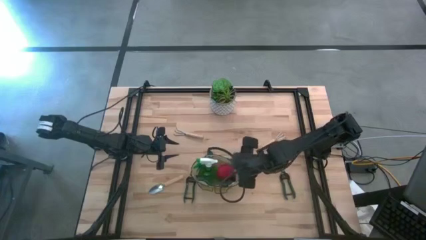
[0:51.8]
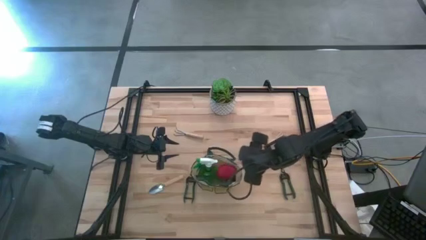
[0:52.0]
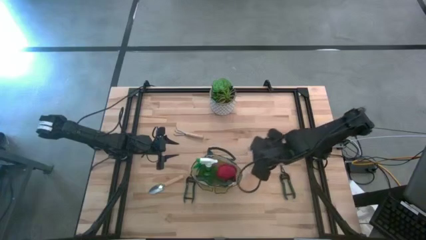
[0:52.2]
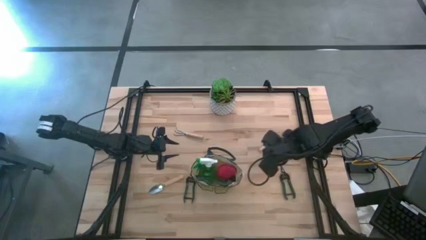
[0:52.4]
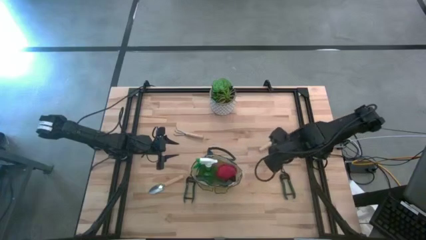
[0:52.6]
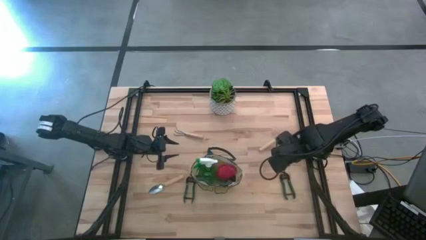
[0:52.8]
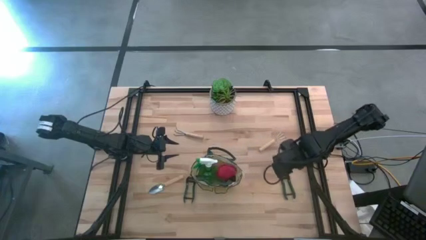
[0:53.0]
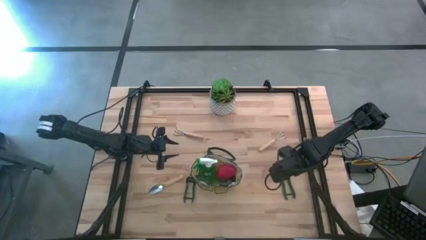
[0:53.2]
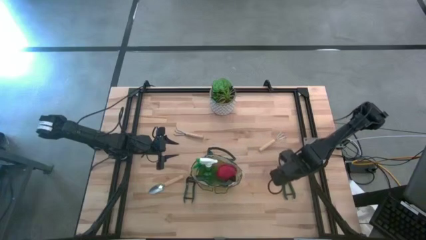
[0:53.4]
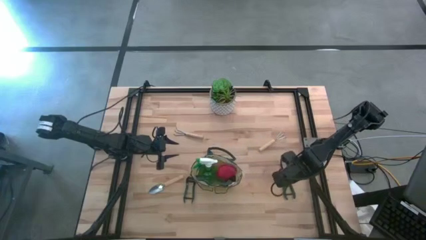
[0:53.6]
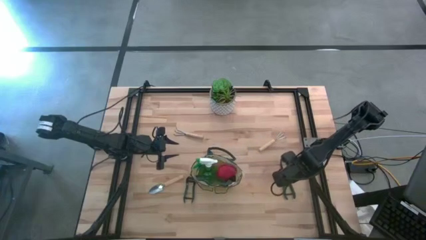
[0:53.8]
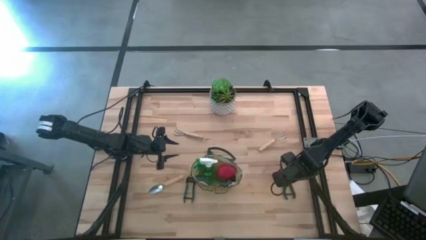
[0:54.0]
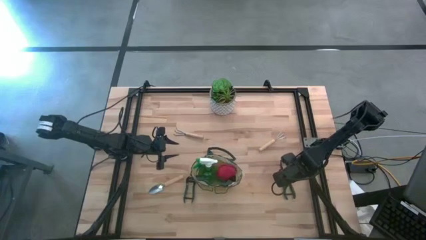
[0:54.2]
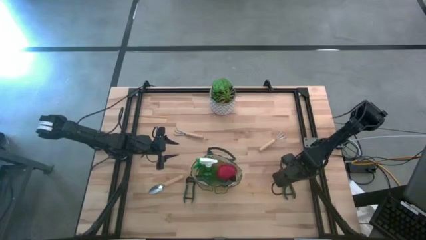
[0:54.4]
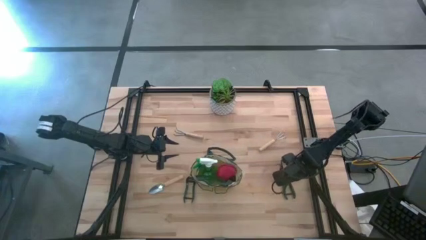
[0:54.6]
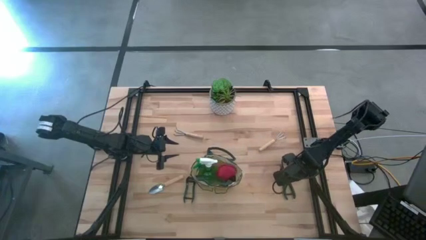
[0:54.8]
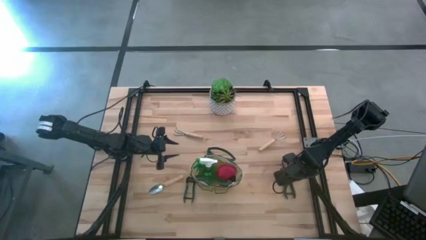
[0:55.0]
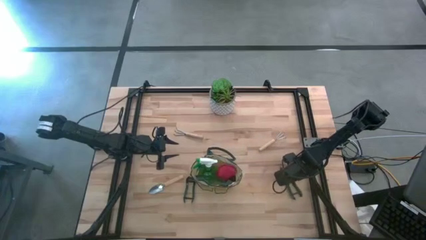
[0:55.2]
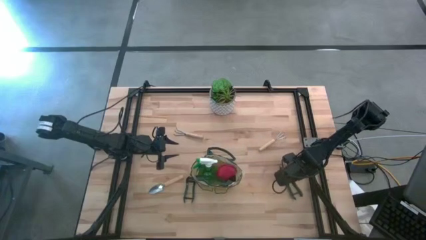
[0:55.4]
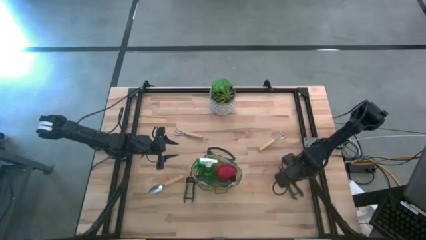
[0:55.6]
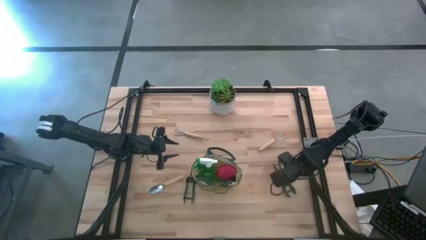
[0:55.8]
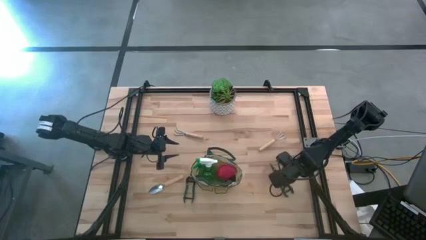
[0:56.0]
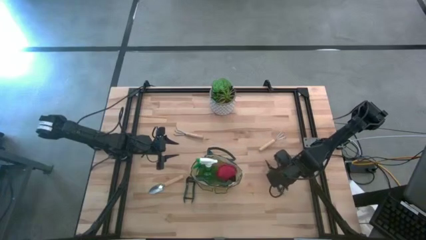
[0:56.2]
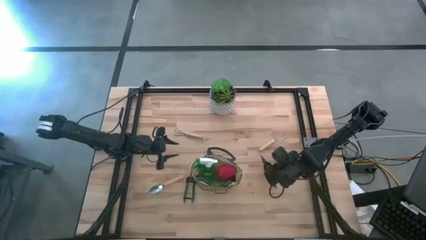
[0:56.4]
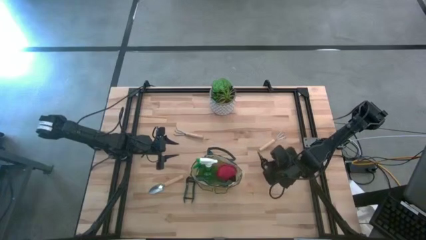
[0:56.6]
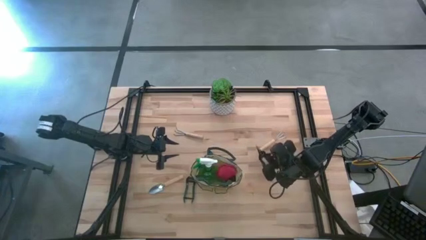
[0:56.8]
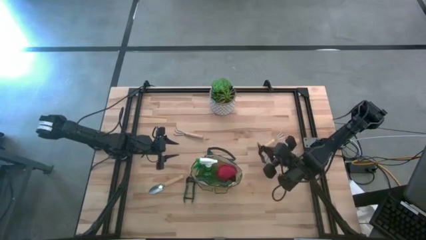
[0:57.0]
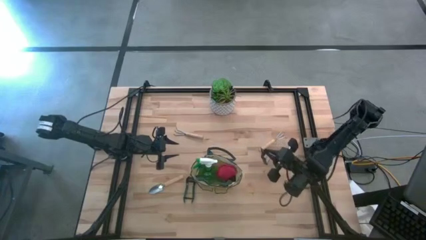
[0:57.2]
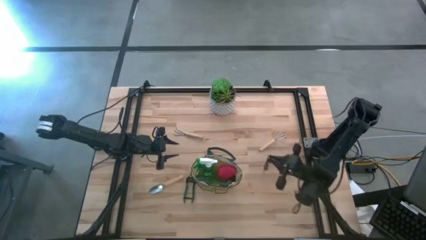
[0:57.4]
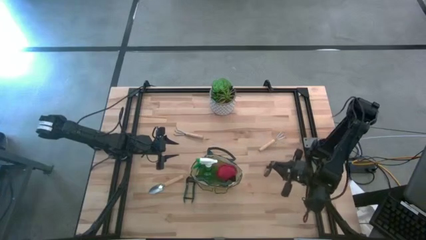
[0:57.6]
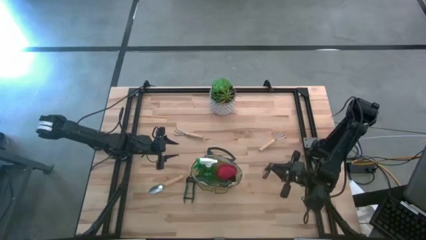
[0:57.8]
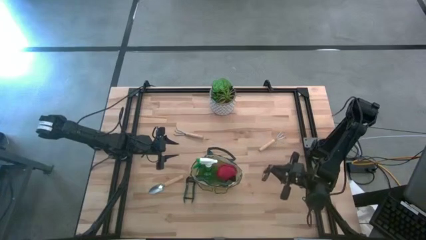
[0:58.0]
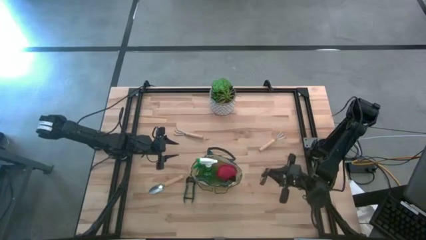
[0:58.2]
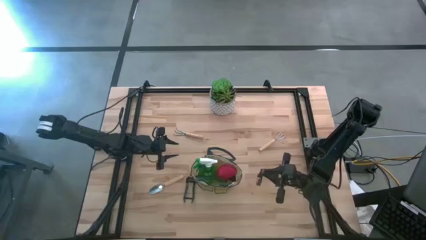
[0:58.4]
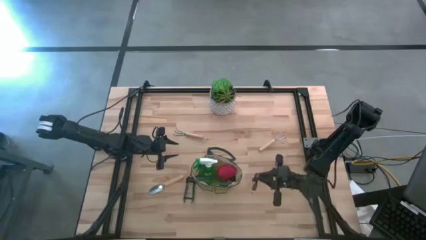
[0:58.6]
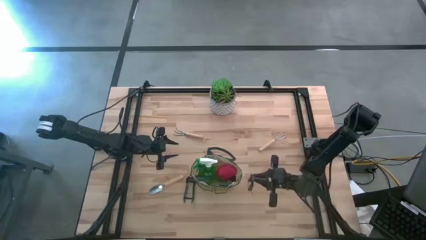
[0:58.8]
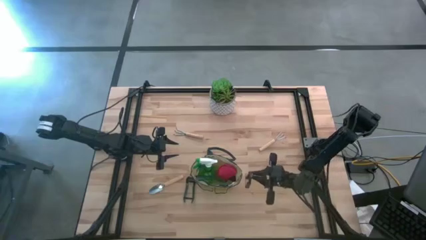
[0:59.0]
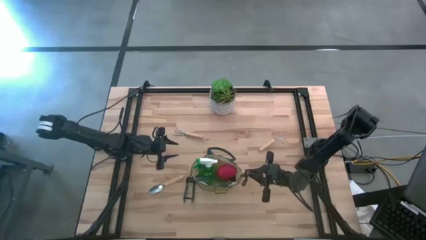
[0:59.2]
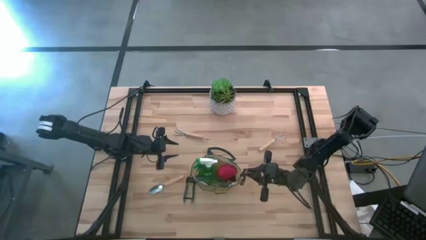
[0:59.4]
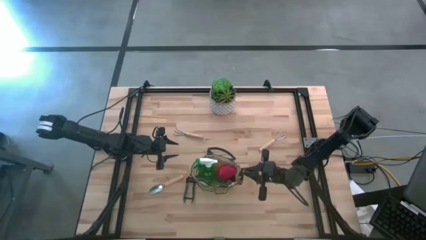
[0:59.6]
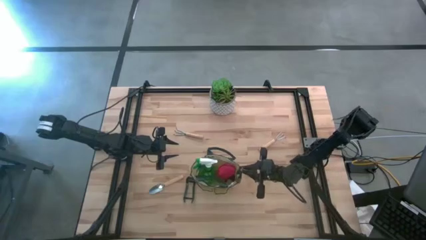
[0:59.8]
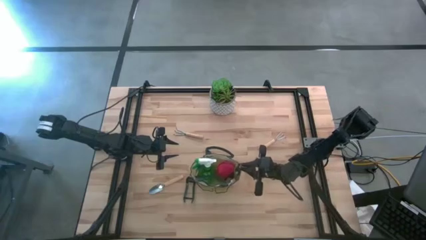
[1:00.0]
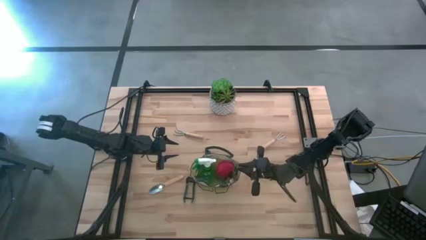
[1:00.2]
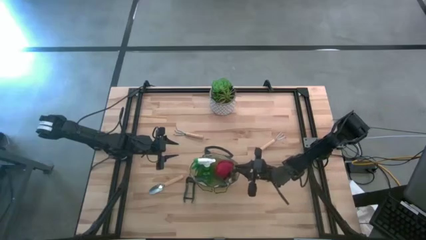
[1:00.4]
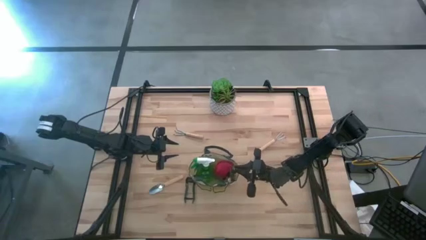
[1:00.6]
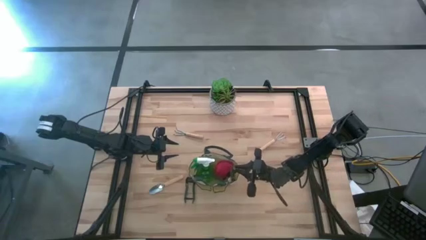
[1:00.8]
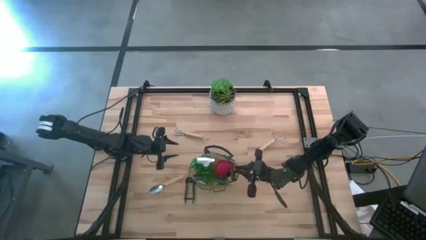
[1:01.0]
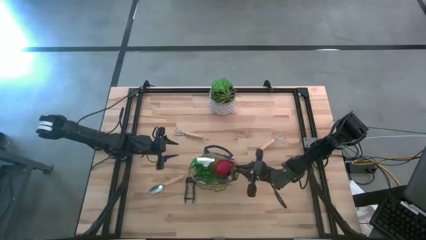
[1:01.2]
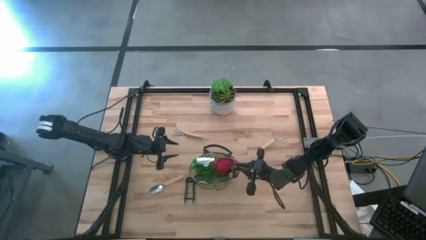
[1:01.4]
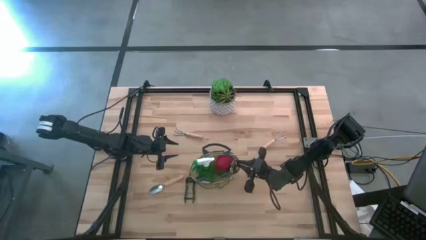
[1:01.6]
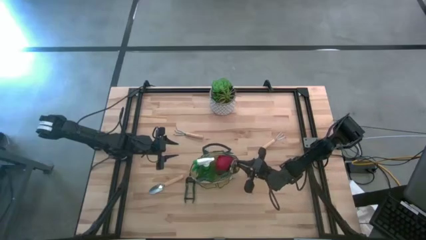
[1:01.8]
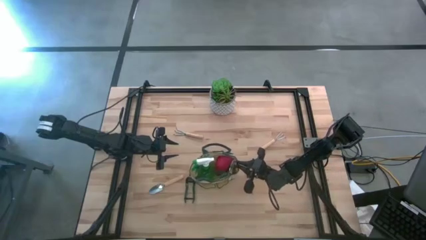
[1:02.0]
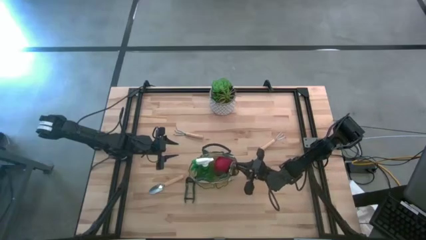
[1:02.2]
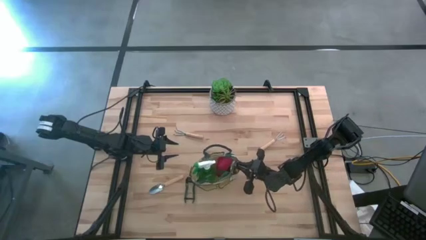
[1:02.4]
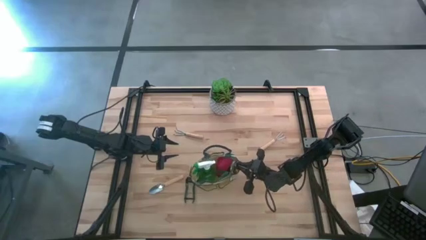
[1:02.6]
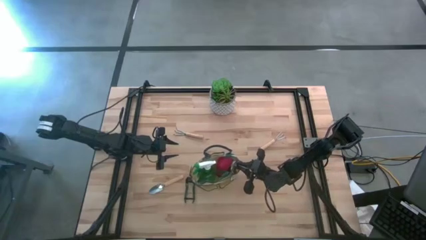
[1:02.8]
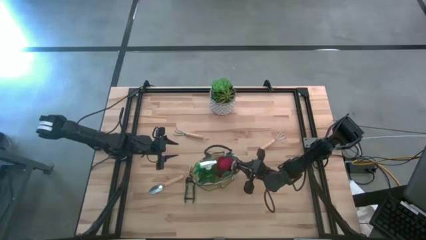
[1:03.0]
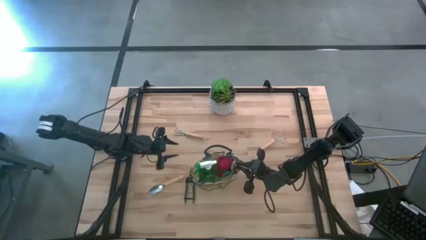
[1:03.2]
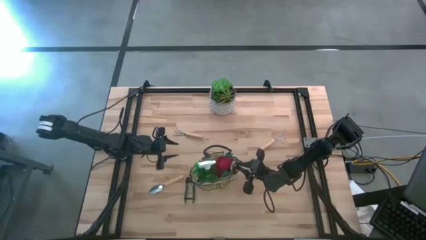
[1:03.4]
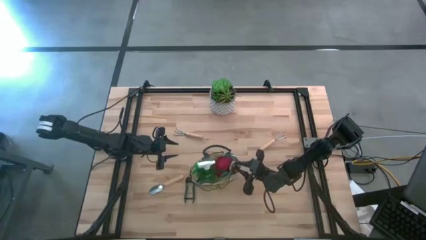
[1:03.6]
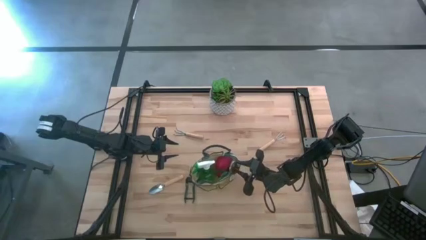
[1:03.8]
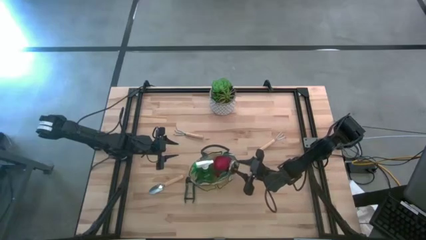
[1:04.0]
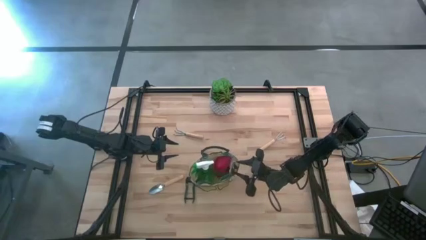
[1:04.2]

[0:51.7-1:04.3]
Task: Pick & Place Garden tools in Gardening bag
Put the right green shear scissors into the white gardening bag

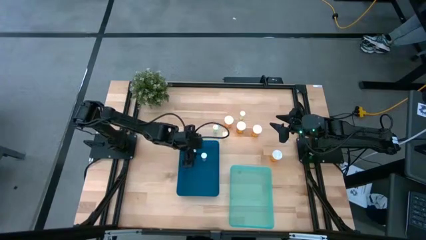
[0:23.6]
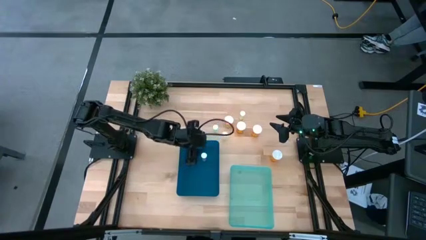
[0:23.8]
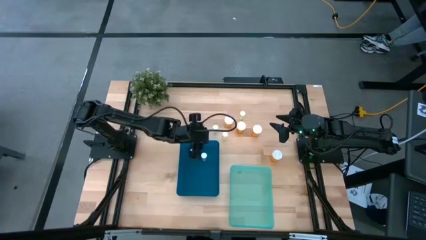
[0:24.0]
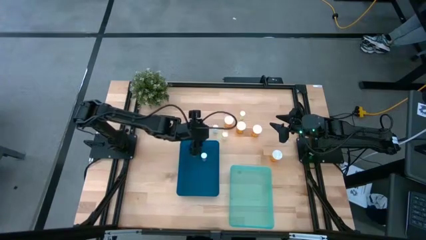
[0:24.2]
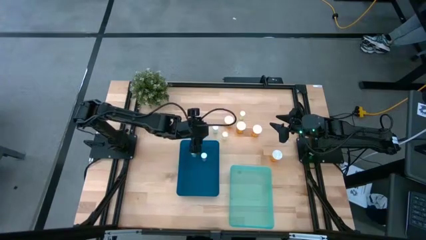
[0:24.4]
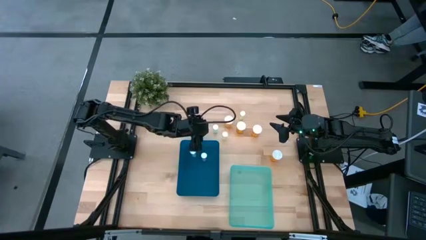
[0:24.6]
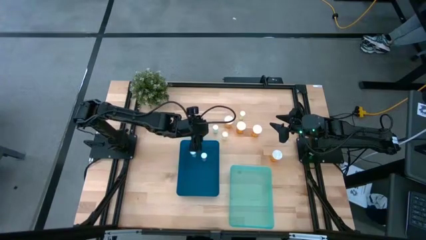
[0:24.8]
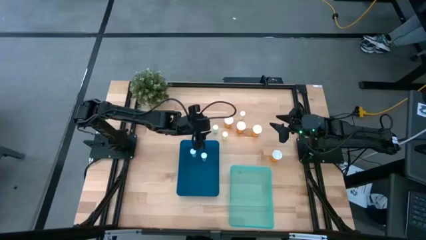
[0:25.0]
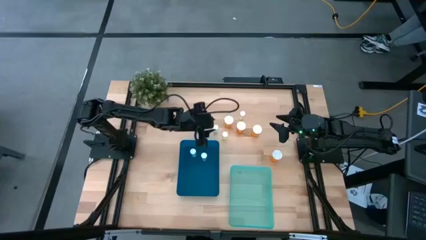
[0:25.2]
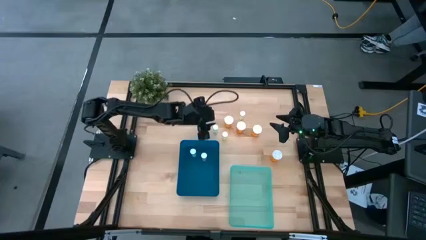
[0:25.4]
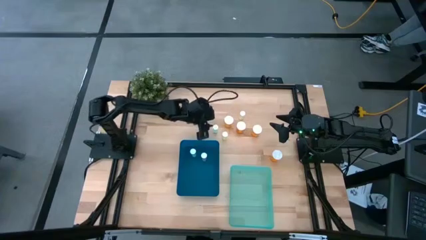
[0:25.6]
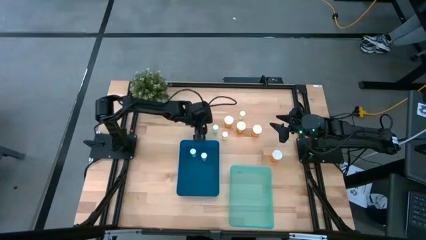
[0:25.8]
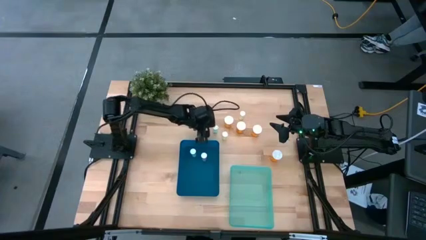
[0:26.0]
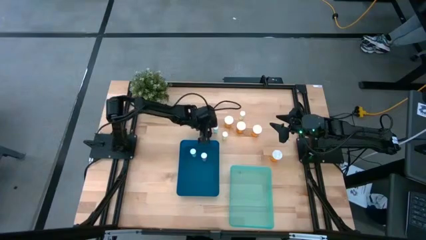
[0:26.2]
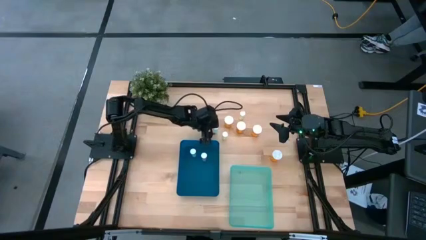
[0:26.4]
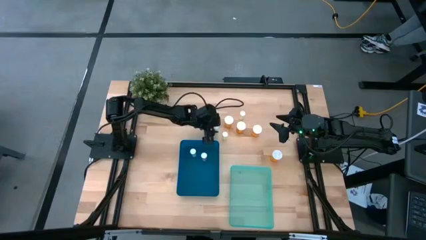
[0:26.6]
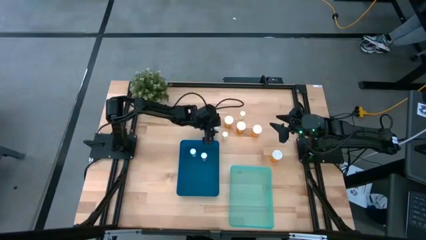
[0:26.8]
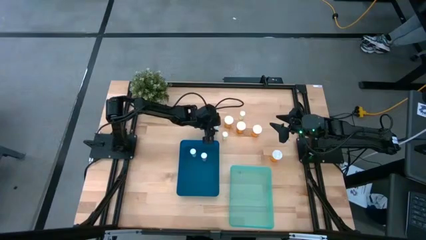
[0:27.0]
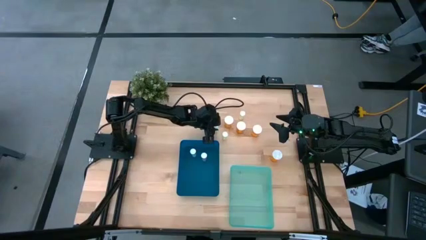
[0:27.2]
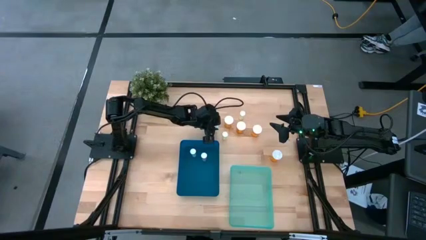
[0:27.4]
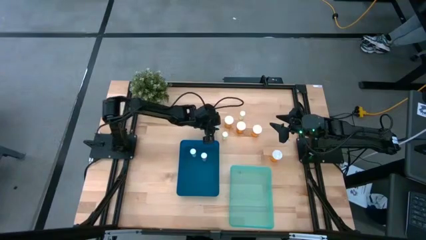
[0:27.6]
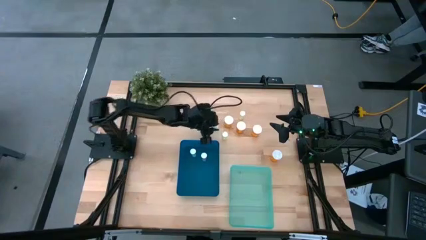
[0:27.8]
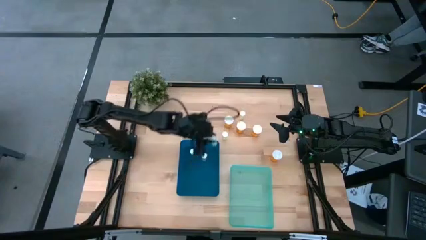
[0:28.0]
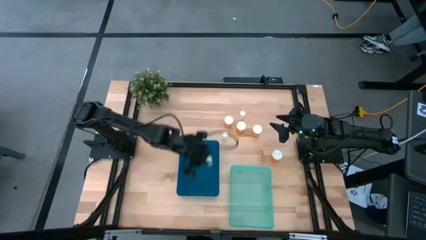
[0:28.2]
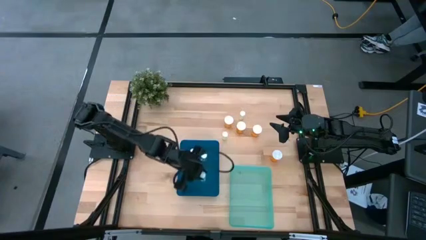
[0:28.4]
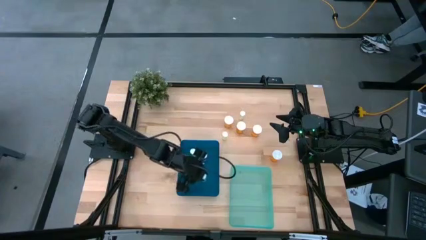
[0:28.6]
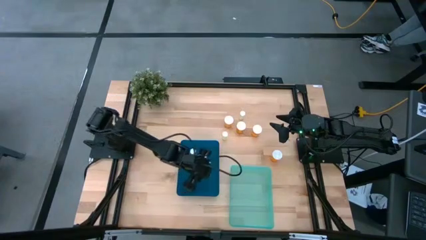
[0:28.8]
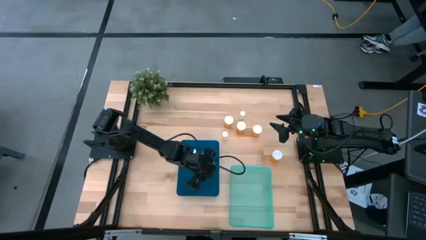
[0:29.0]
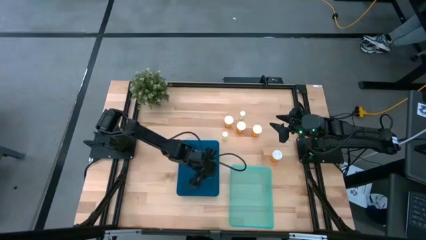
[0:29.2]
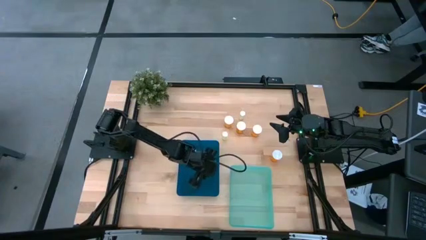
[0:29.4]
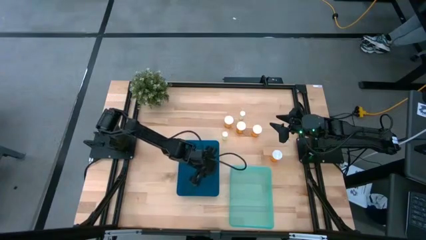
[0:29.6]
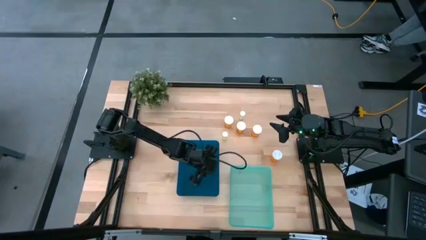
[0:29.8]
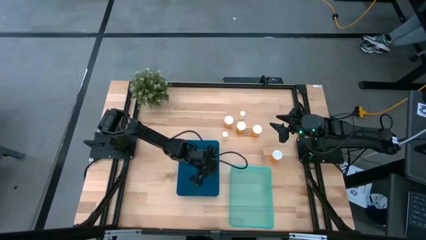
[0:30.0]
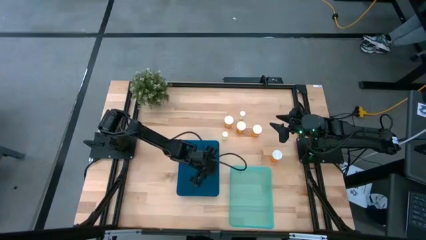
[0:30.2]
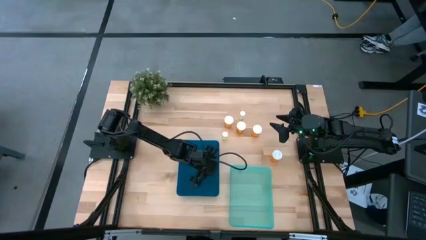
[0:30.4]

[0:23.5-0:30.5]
Task: Pick and place medicine bottles into bin by pill shape (circle, oval)
Put the blue pill bottle into the blue bin
